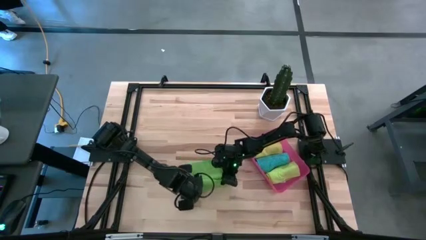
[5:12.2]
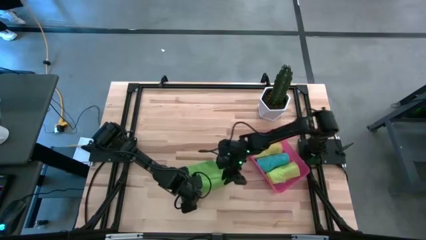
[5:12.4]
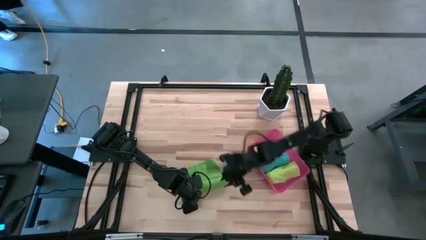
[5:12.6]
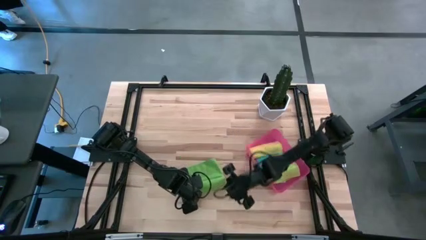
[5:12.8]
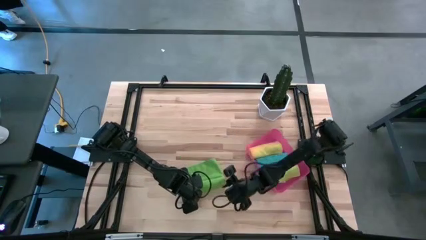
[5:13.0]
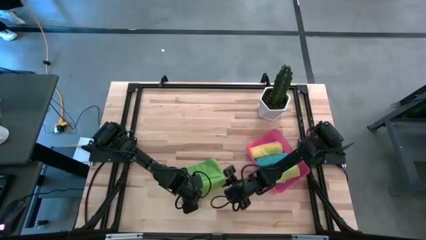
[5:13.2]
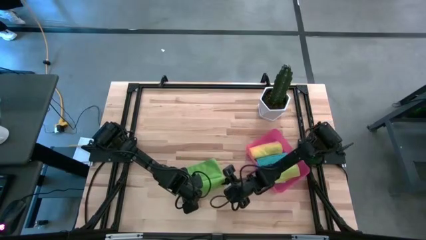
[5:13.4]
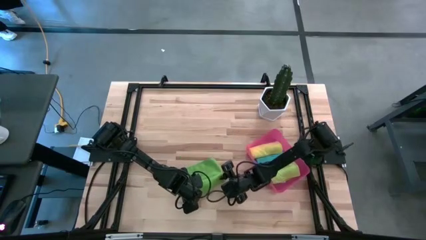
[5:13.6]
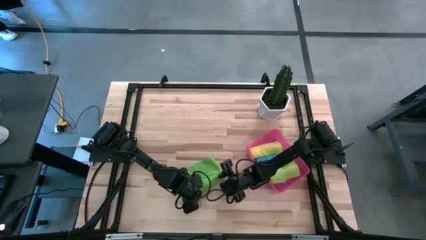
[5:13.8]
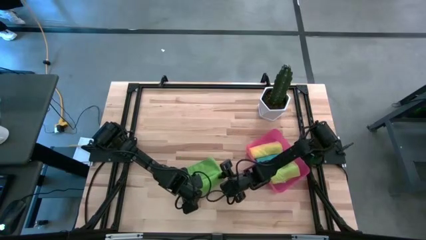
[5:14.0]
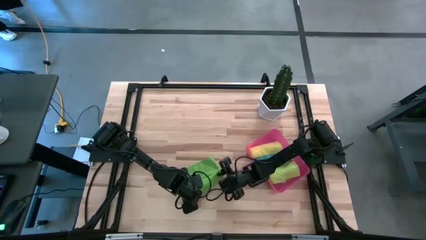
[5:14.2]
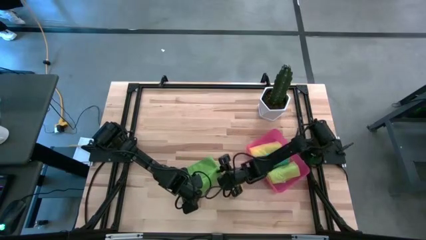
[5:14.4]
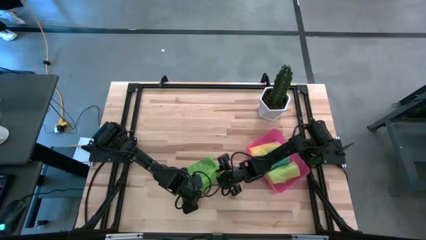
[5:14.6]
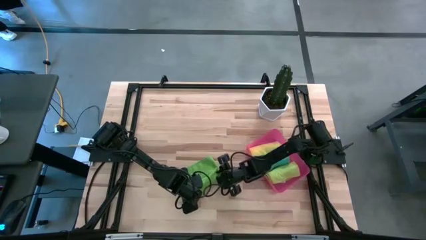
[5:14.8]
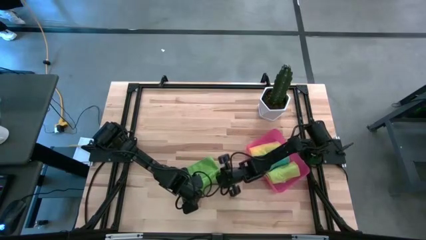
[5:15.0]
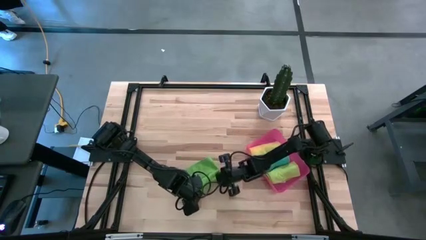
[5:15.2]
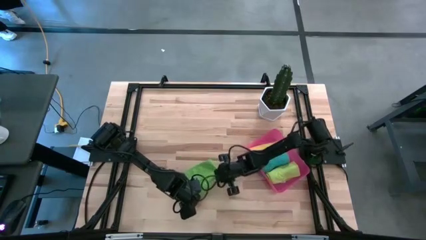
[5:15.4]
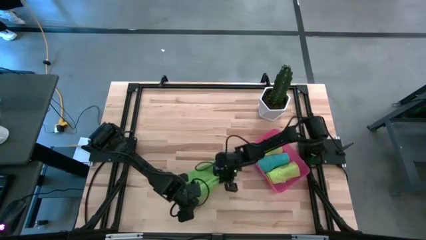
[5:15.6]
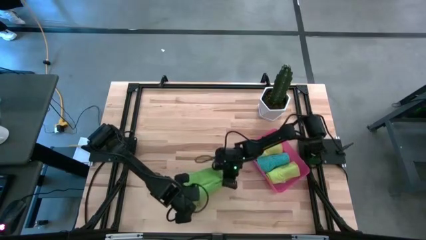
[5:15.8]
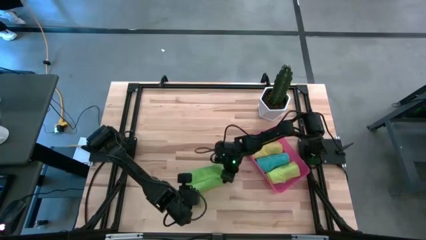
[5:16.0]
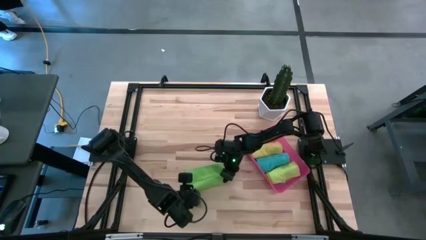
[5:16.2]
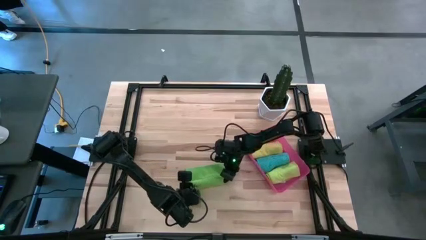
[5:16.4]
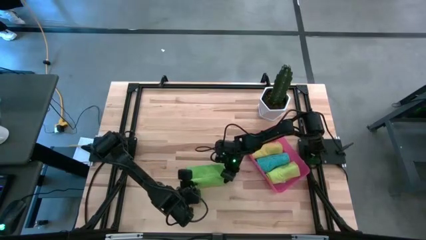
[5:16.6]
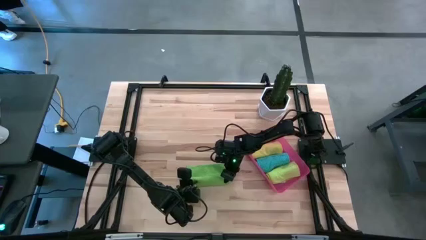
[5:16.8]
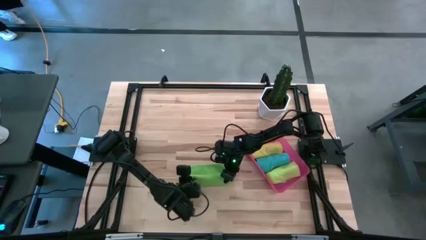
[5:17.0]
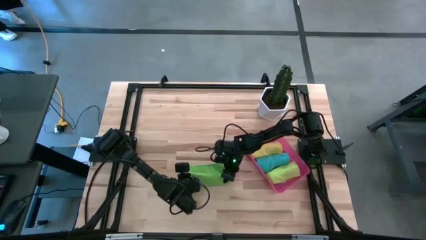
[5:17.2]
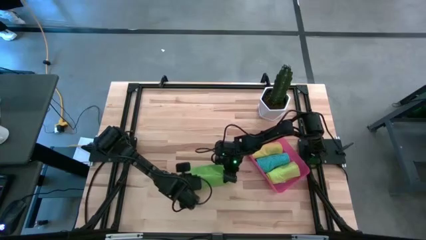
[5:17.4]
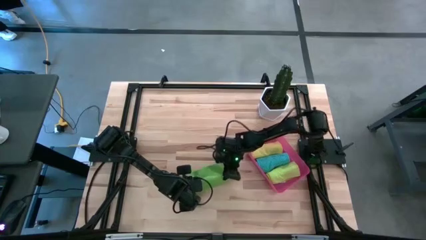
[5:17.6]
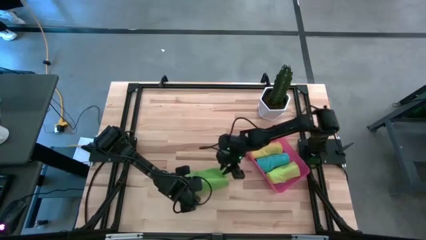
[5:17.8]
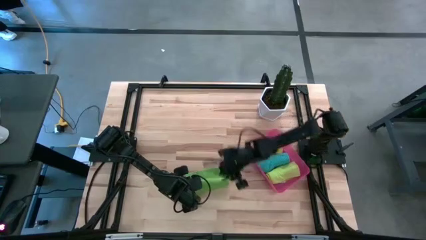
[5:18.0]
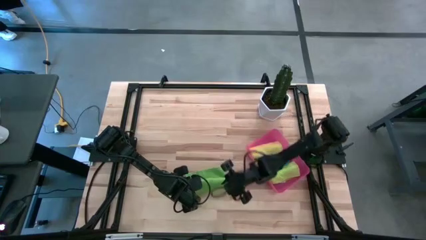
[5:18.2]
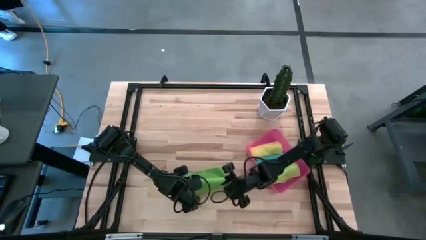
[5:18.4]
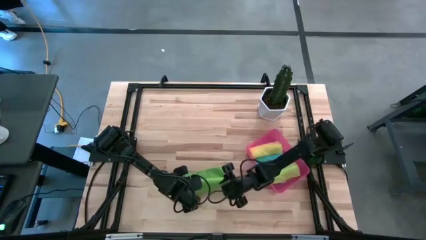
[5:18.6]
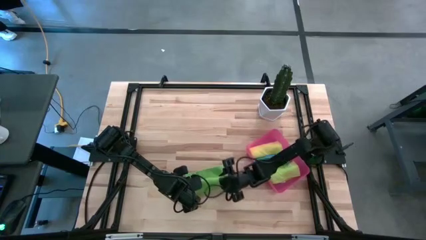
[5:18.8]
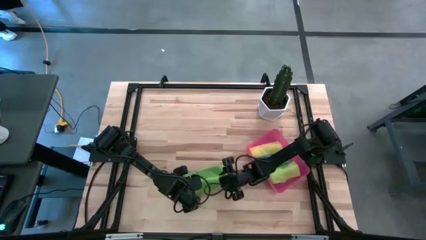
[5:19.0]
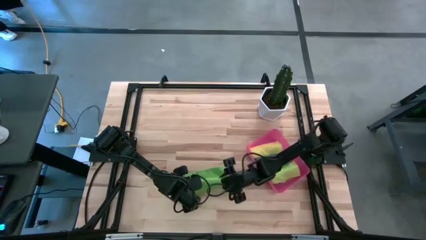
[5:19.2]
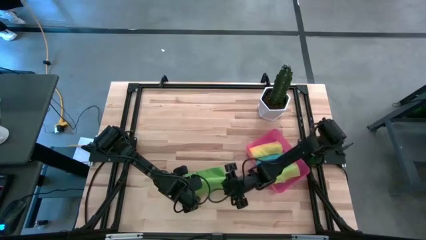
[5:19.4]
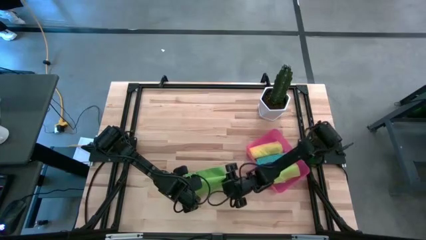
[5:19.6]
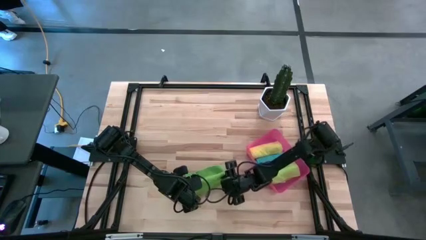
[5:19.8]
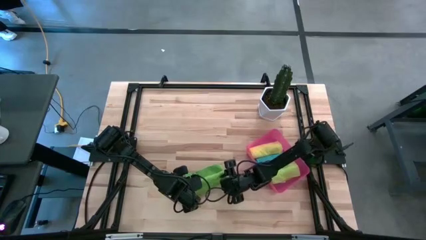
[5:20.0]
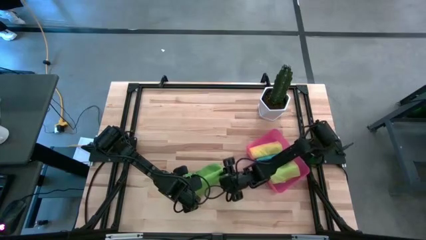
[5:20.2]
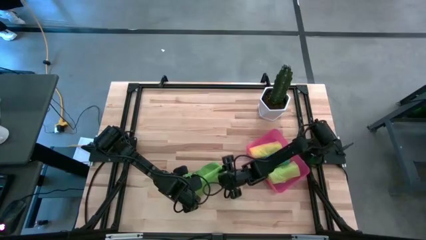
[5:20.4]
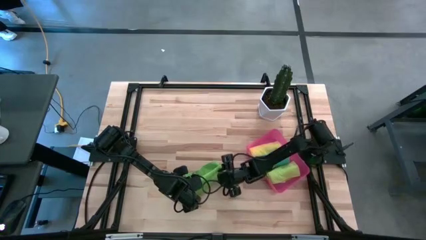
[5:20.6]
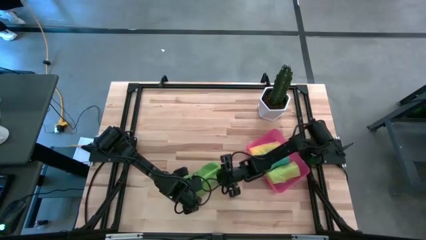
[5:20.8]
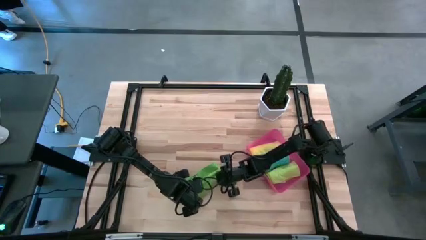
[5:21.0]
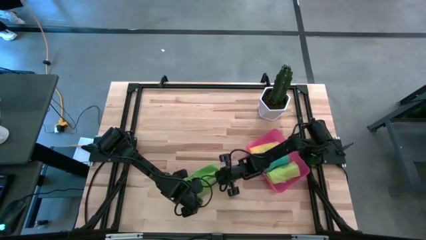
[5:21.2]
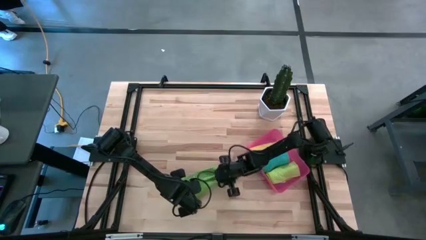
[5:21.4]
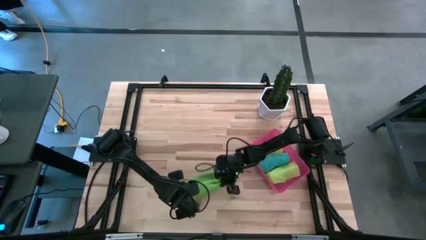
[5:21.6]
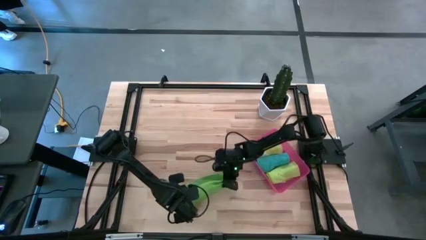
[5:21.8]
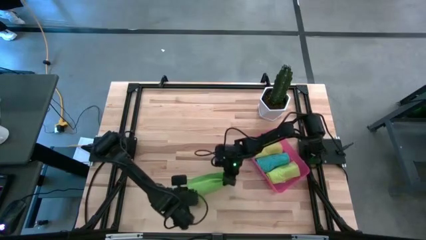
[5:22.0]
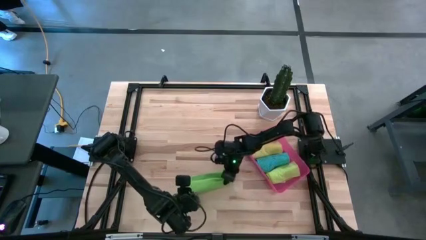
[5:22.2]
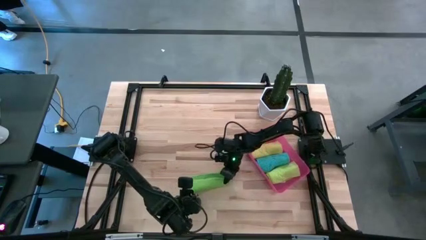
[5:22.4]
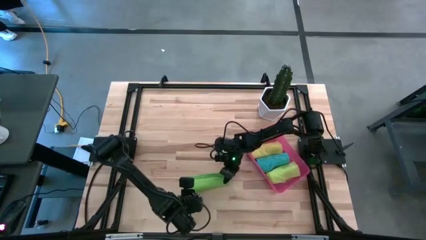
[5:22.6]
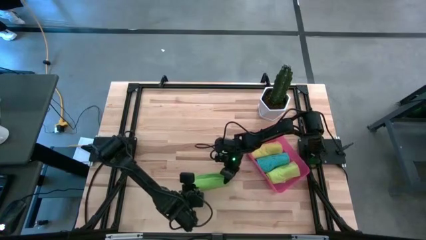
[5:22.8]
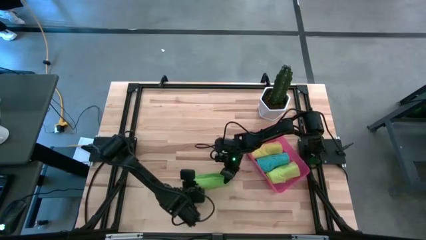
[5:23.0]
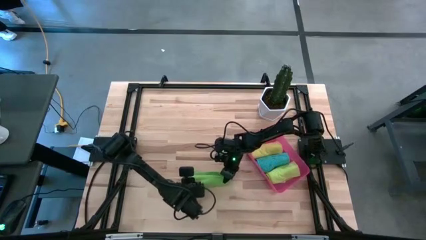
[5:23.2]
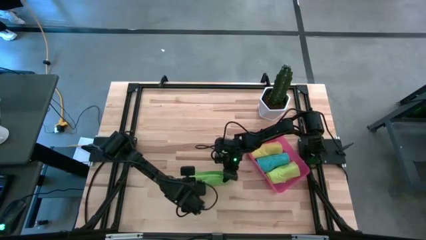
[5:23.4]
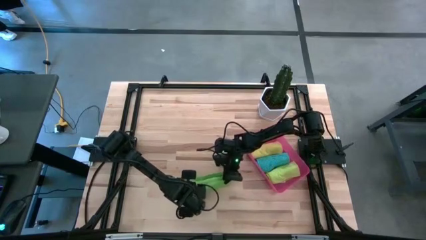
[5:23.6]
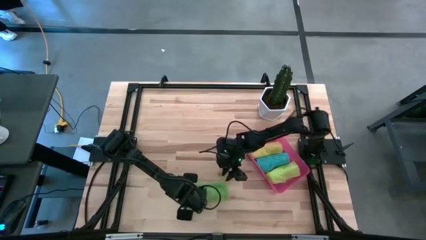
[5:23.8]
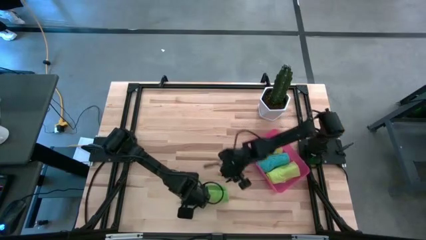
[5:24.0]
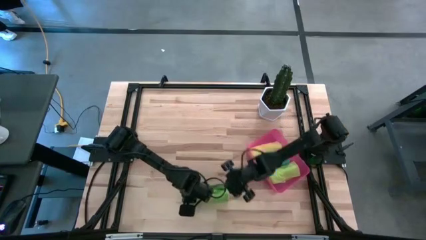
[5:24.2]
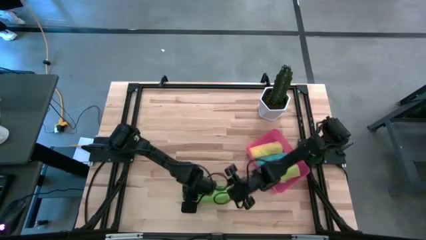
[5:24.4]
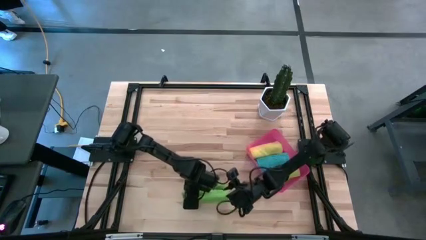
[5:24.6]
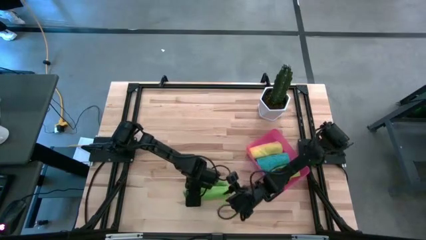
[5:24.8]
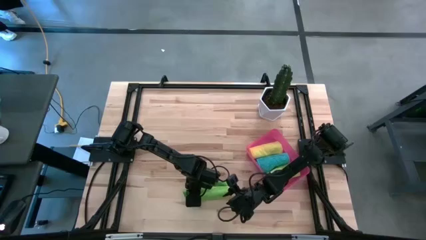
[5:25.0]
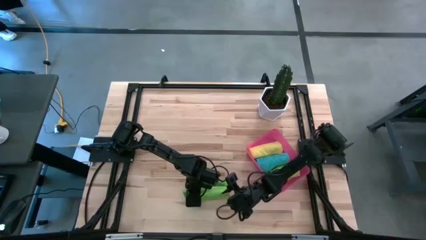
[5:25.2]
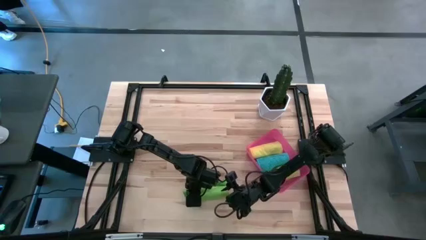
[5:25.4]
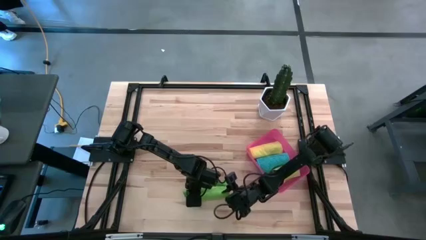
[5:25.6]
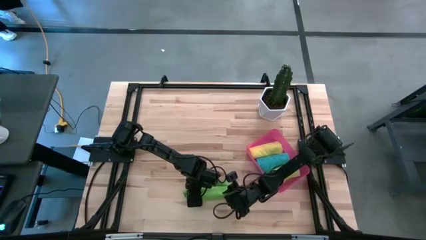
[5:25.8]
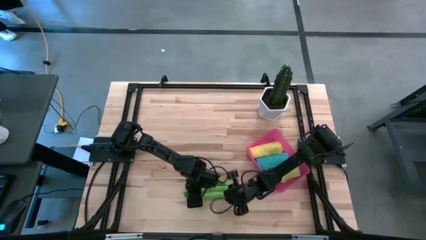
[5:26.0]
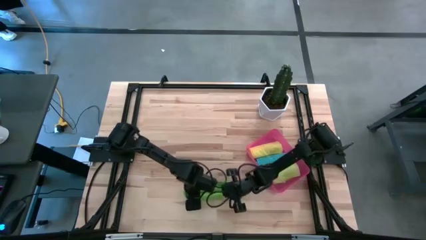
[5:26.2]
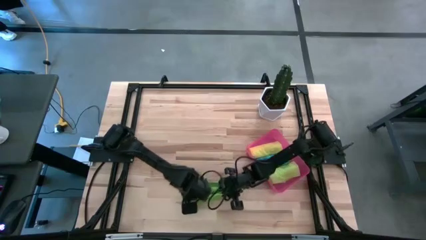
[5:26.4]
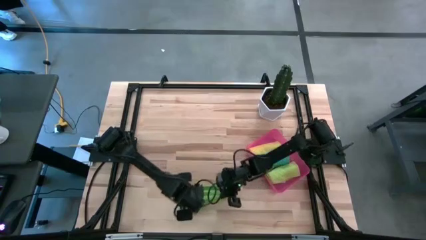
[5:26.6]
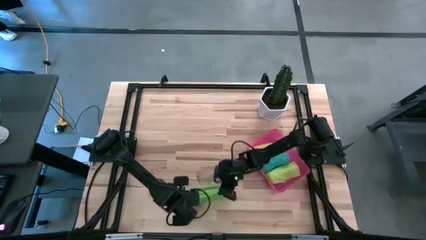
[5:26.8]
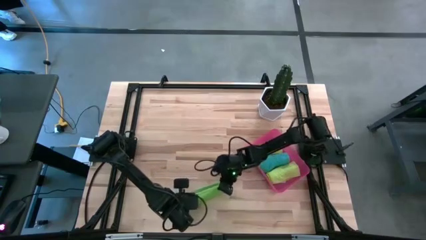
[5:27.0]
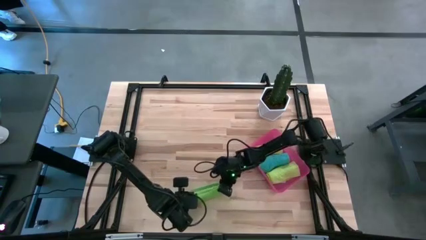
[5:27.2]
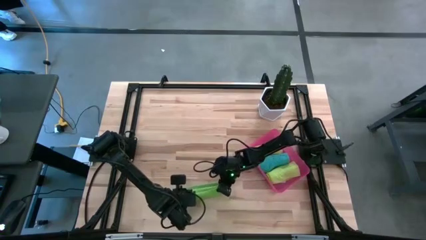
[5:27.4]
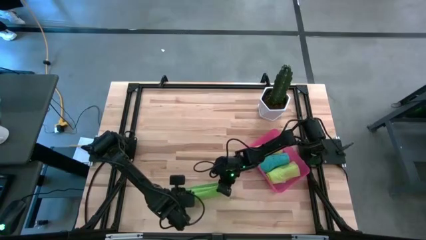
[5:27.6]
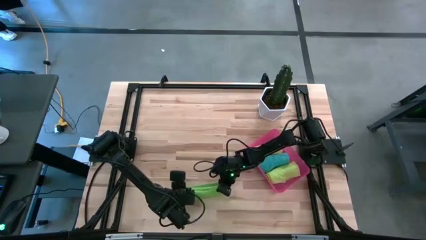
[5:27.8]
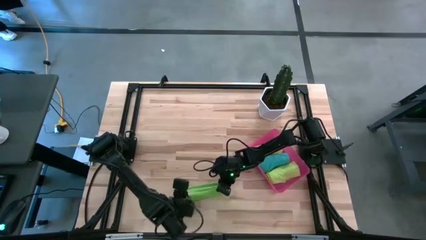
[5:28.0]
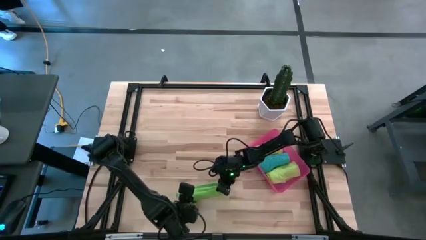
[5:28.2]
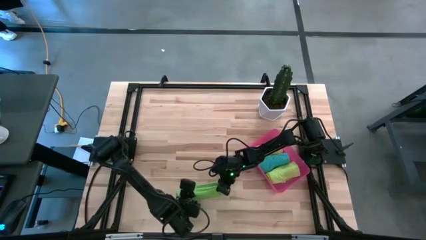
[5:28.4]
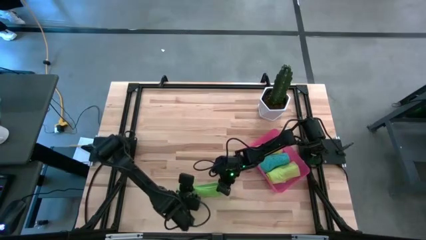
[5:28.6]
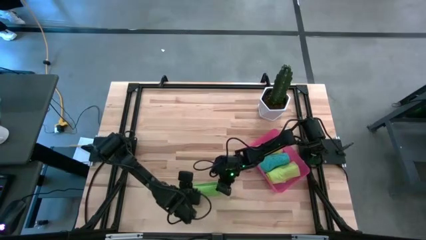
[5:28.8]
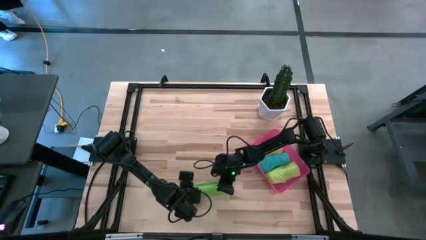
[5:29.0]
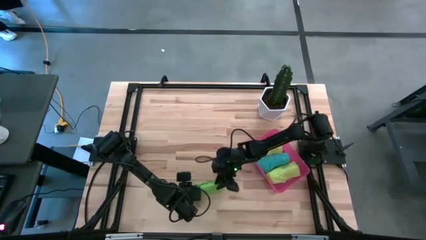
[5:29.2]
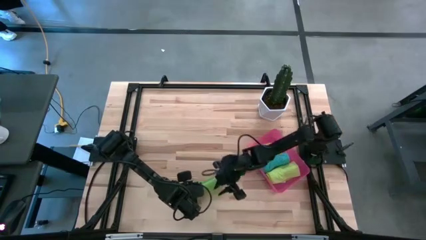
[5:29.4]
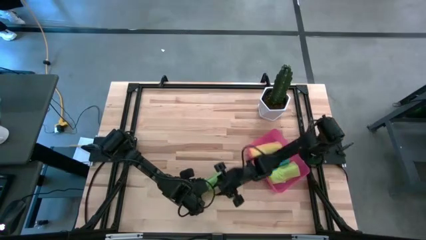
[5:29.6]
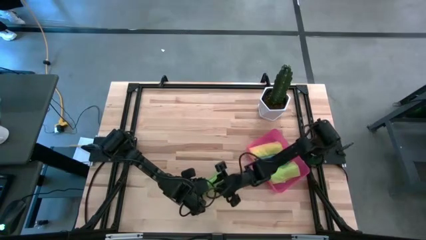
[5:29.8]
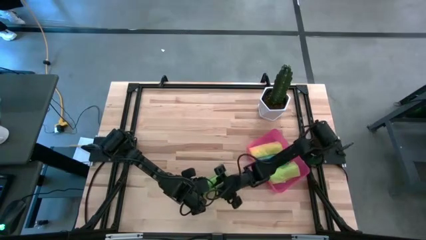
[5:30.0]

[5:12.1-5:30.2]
Task: Roll microfiber towels into tight, uniform cylinder then place into a basket
Roll the green microfiber towel
